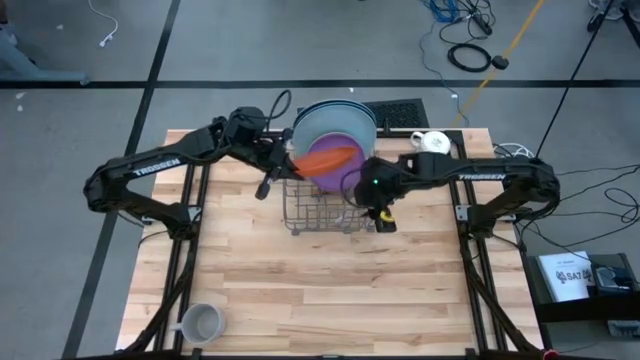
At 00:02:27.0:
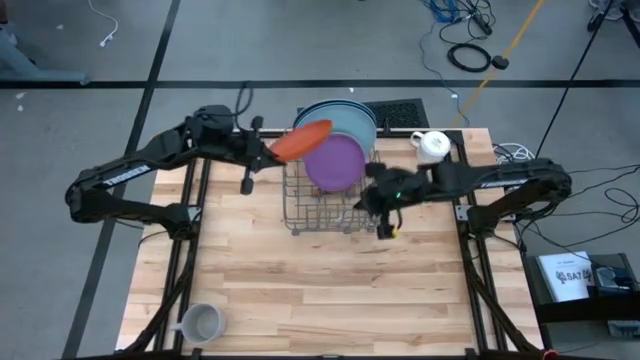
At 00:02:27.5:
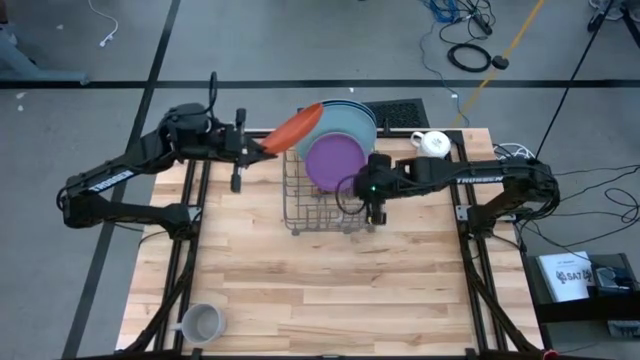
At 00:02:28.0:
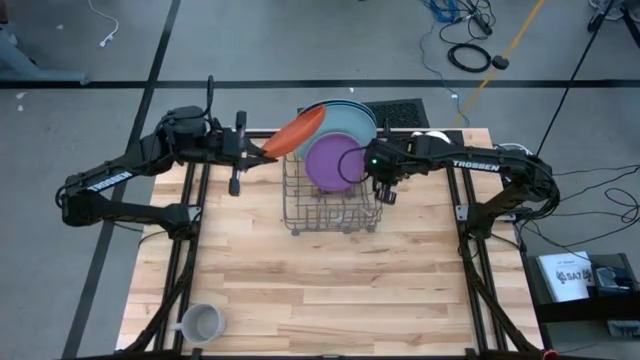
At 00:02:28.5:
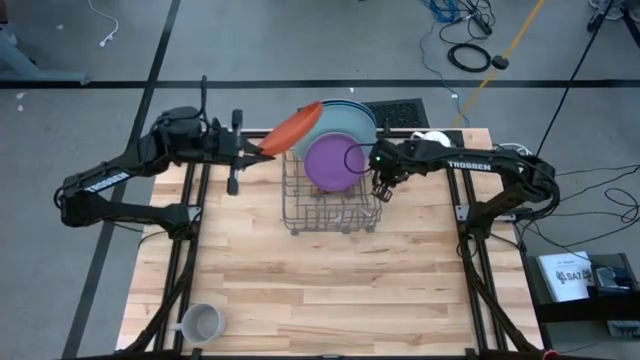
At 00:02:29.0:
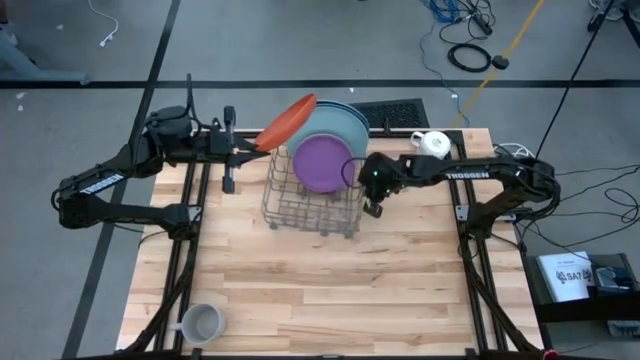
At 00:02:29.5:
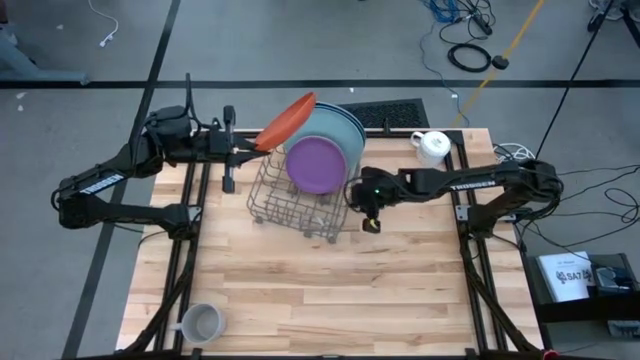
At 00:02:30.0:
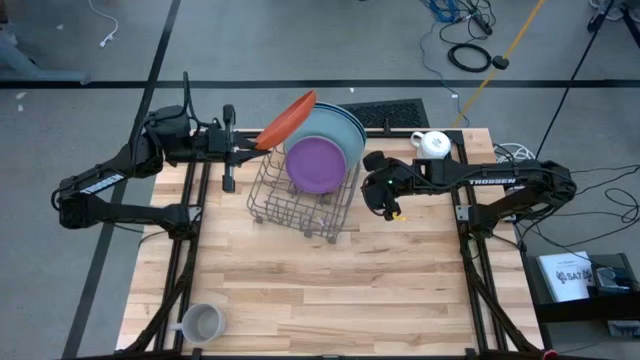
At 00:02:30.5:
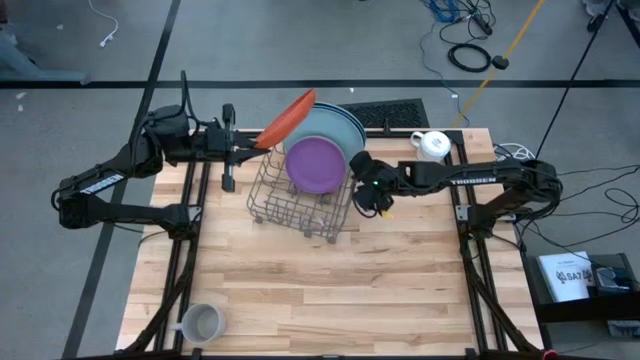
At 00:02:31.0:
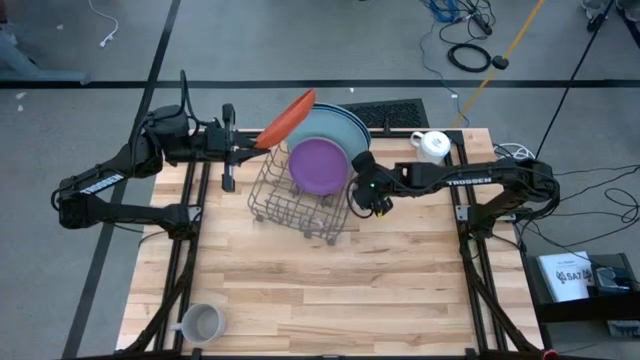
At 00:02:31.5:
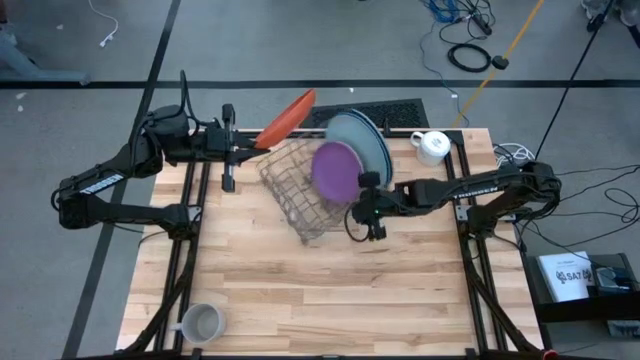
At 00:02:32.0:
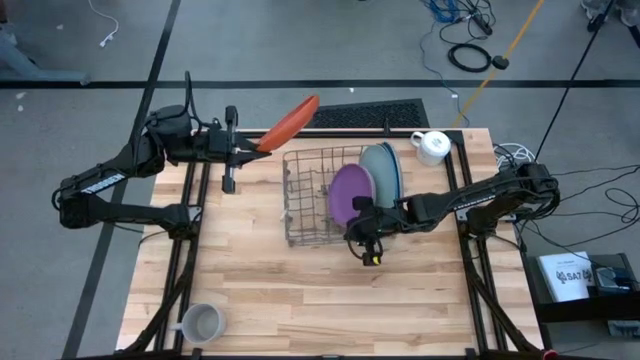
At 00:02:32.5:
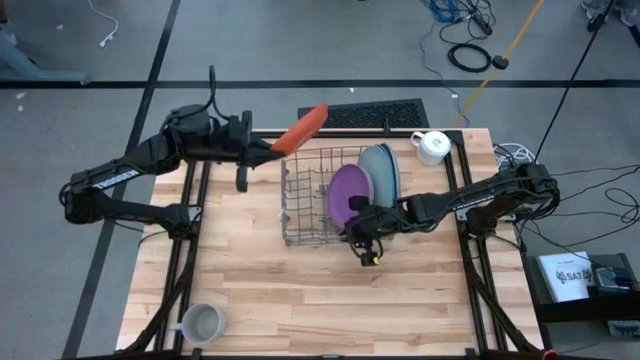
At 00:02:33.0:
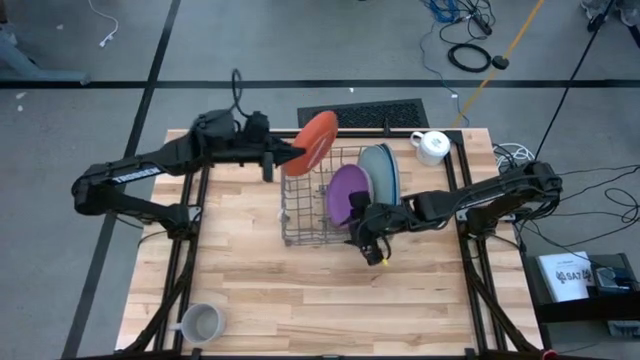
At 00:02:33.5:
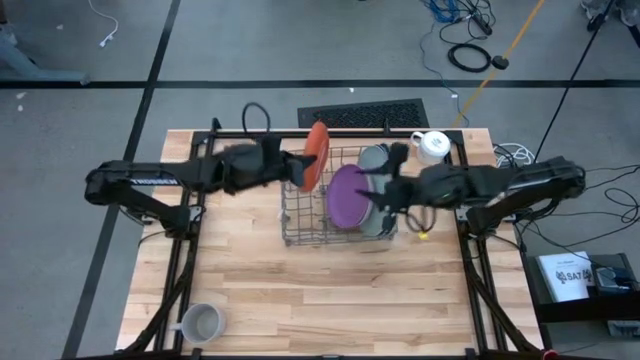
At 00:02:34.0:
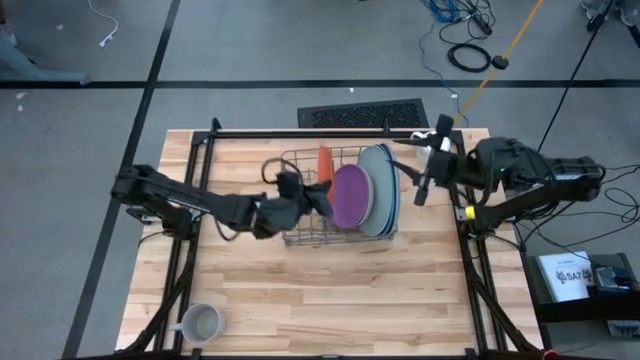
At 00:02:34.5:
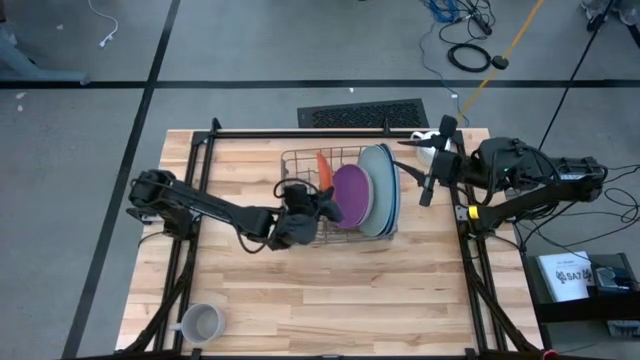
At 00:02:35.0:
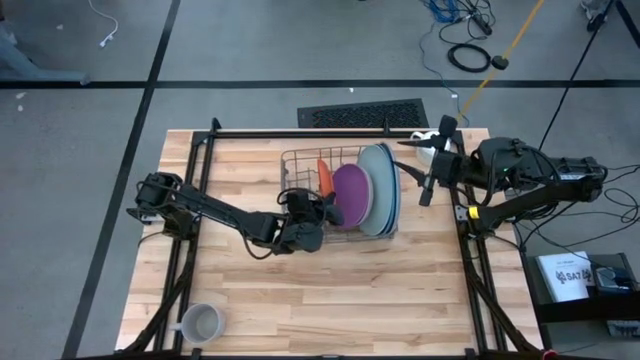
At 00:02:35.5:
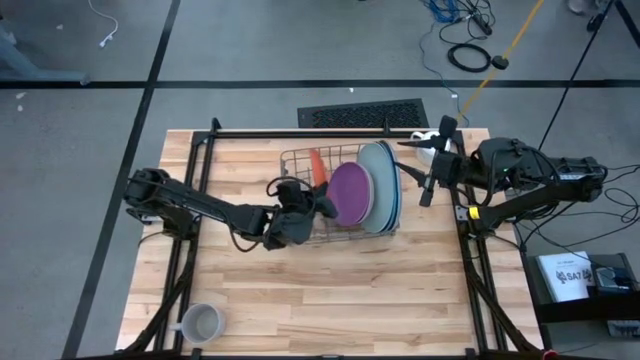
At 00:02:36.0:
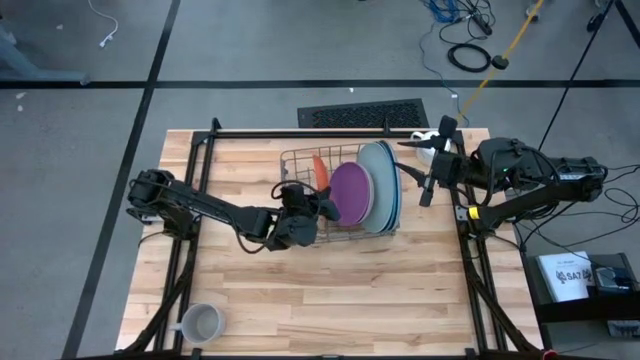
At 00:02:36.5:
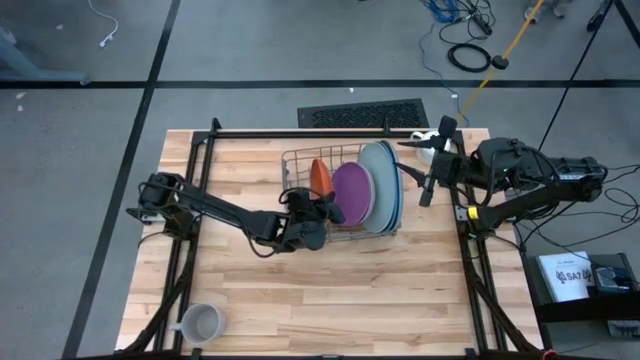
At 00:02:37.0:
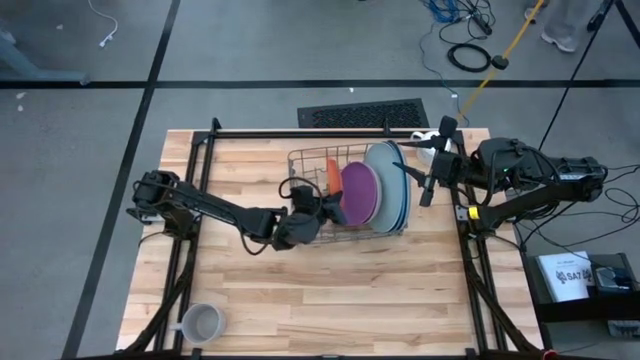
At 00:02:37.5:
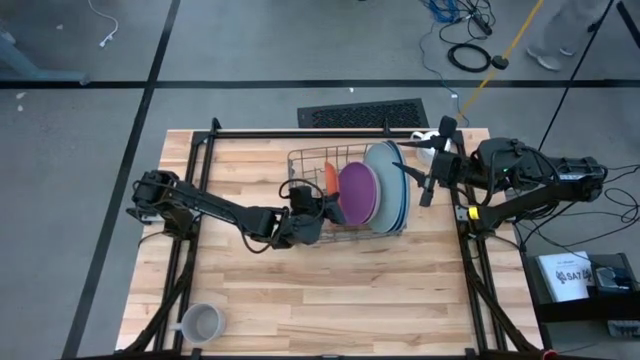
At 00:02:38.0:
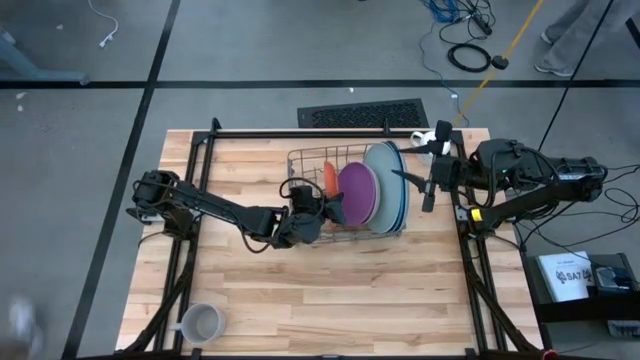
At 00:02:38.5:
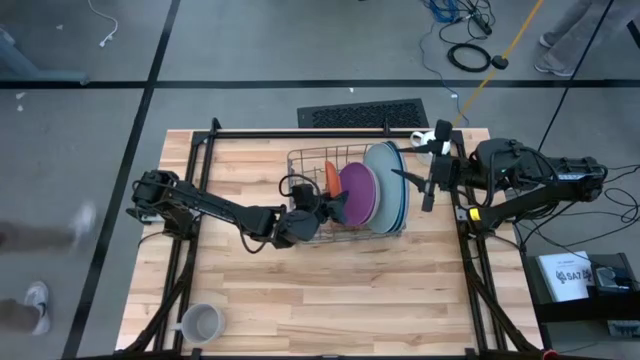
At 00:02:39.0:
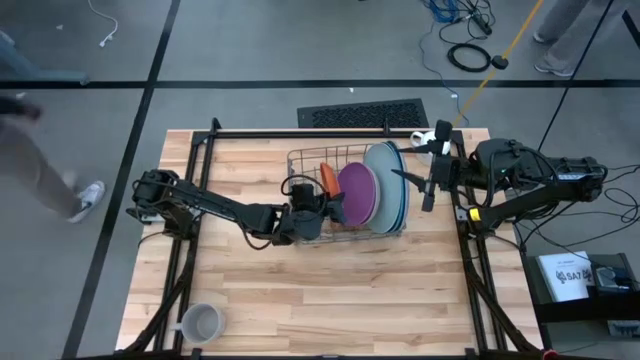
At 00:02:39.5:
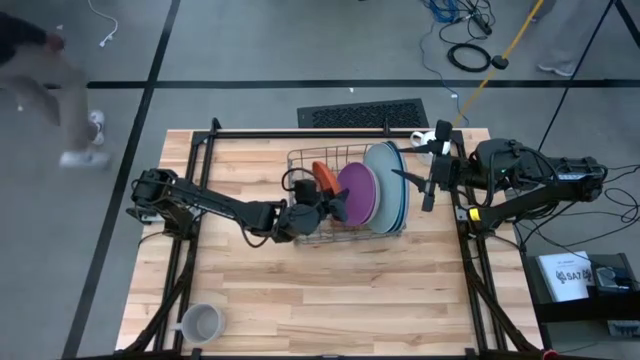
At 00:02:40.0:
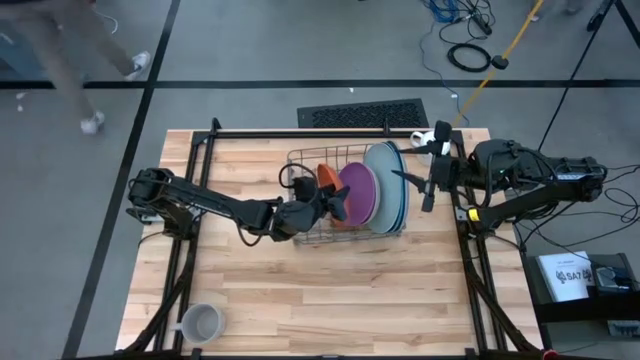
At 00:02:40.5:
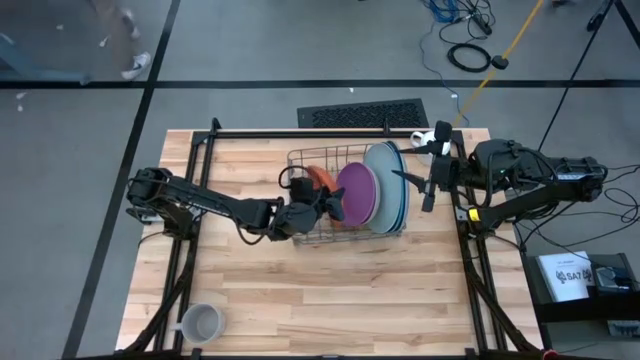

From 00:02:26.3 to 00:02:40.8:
Task: Sort dishes
Put the orange plate into the dish rack

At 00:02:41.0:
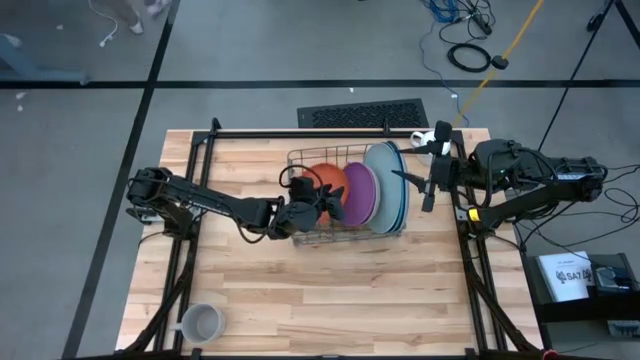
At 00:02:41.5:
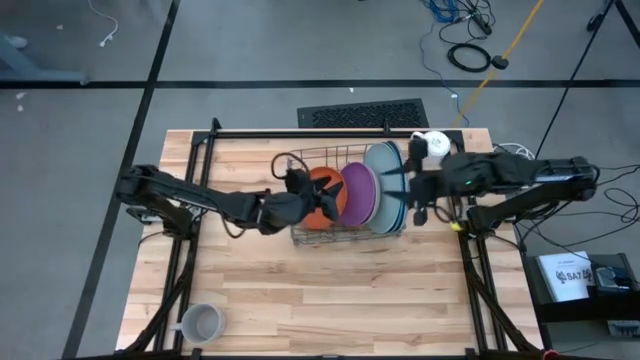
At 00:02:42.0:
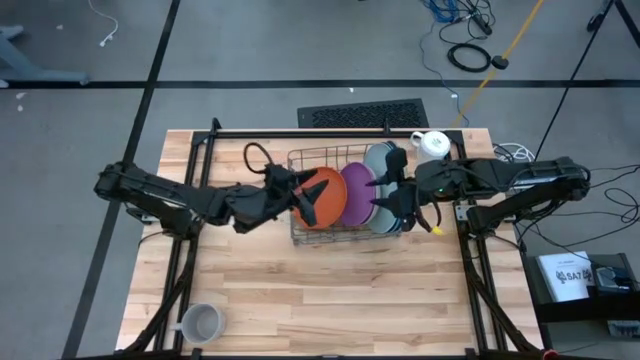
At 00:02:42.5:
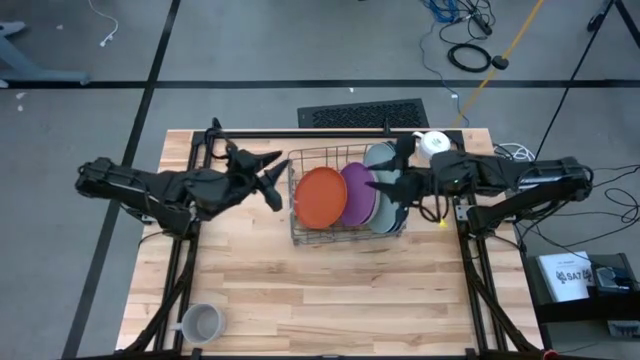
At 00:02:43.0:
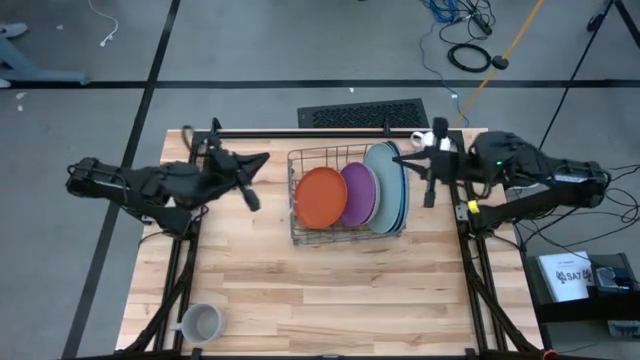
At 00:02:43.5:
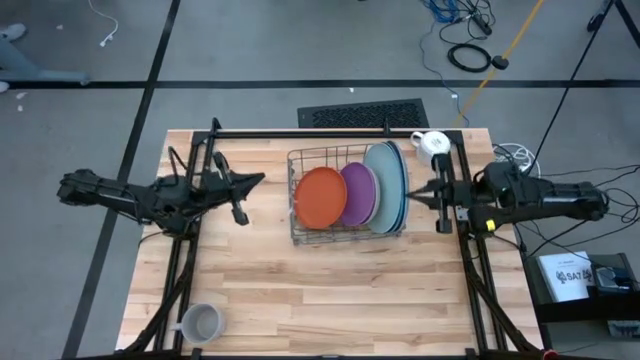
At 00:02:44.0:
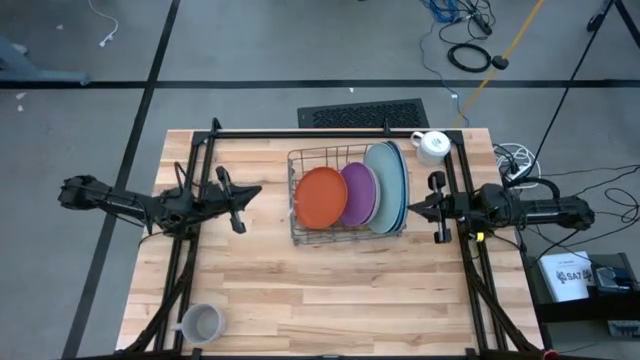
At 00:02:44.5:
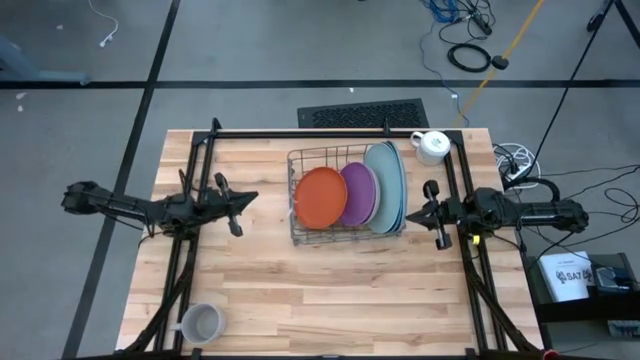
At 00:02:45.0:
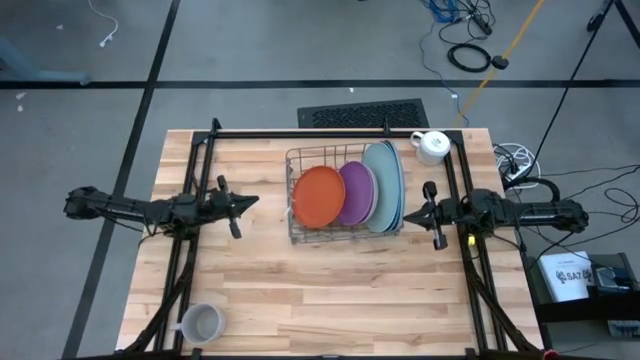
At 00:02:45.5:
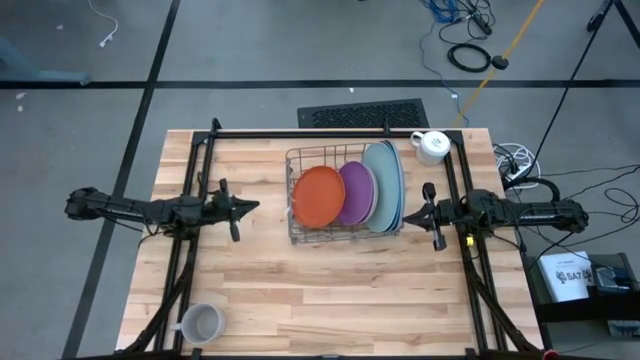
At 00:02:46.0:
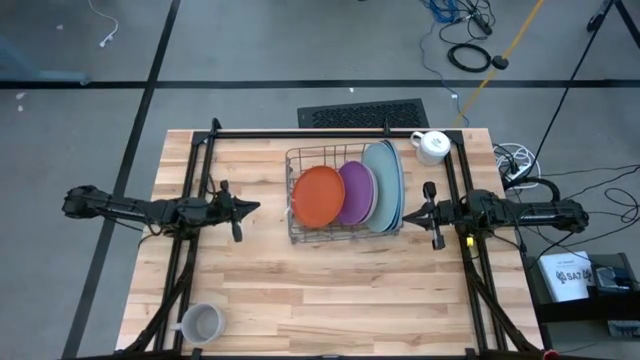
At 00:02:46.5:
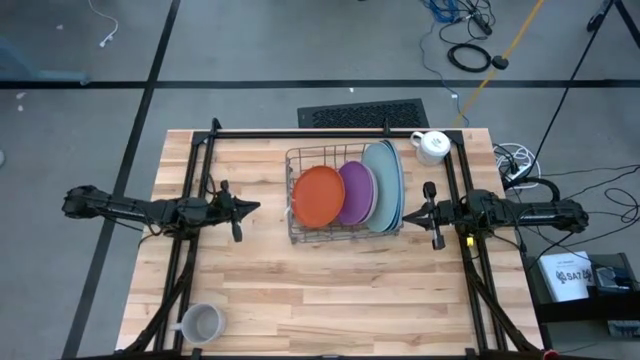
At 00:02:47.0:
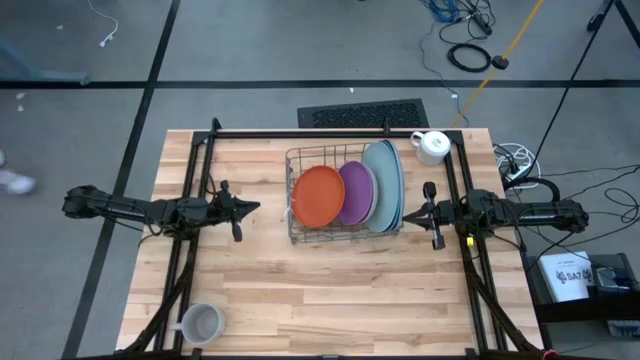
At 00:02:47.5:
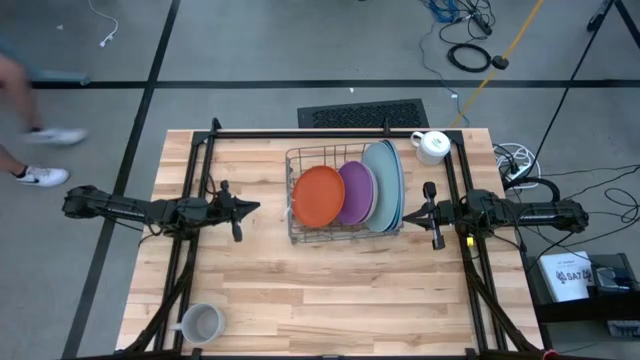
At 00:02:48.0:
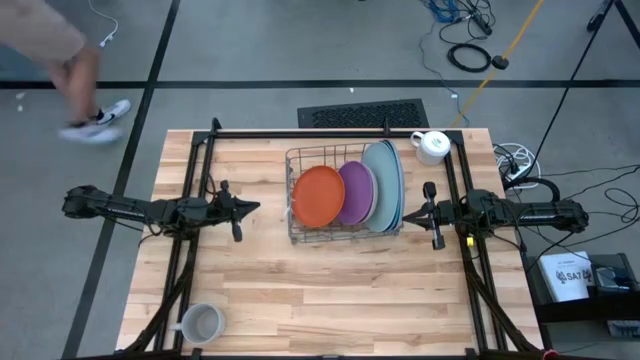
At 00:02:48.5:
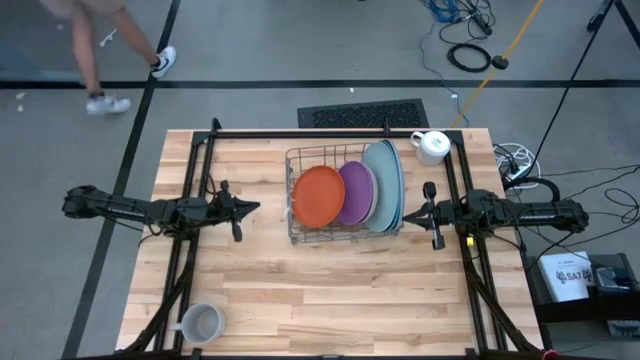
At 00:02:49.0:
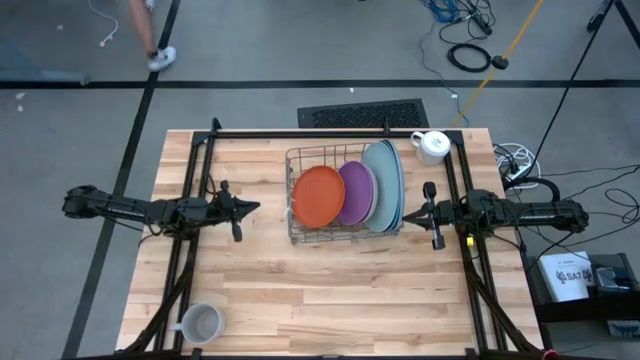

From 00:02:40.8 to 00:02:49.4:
Return to Home Position
